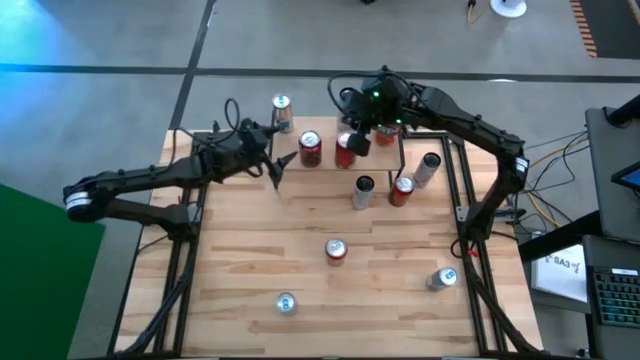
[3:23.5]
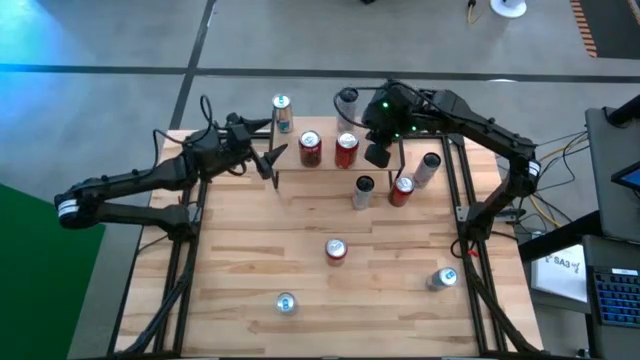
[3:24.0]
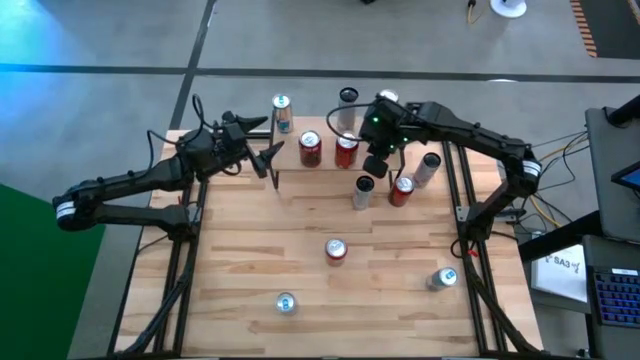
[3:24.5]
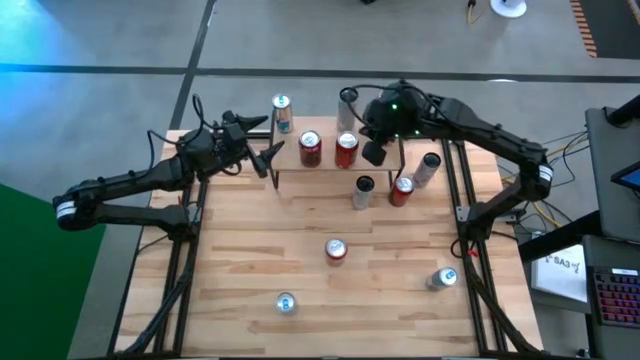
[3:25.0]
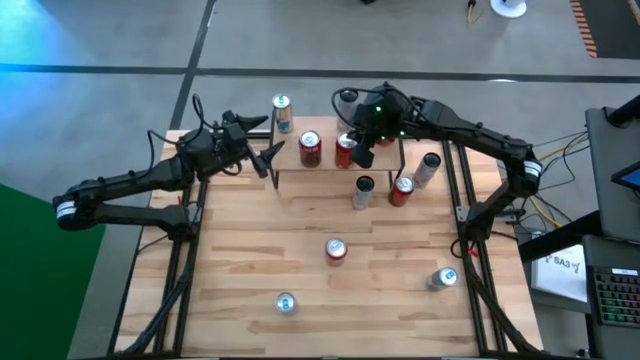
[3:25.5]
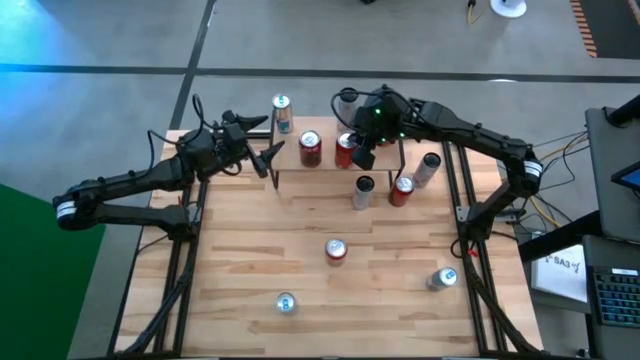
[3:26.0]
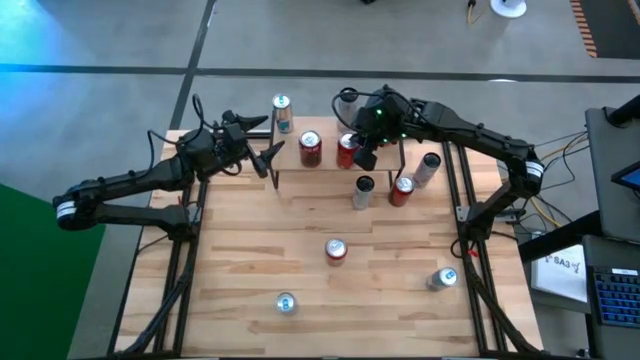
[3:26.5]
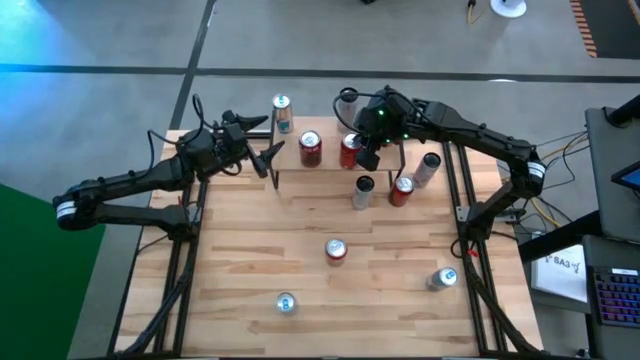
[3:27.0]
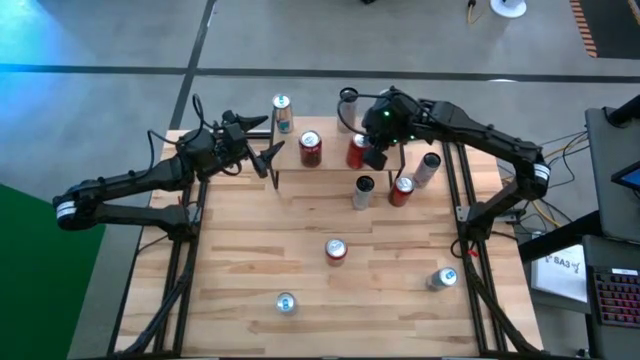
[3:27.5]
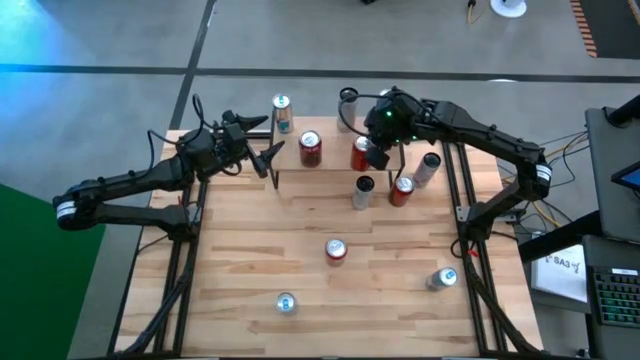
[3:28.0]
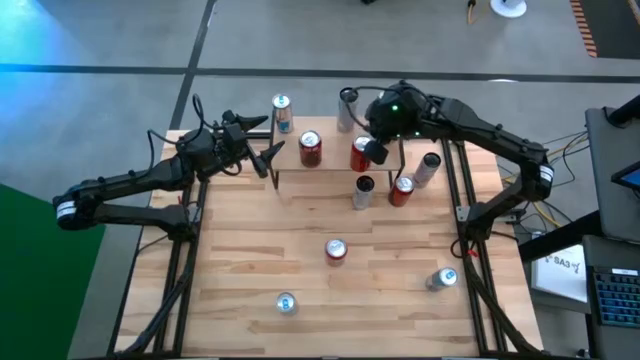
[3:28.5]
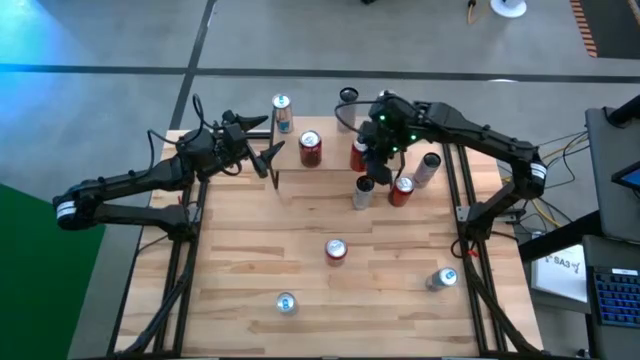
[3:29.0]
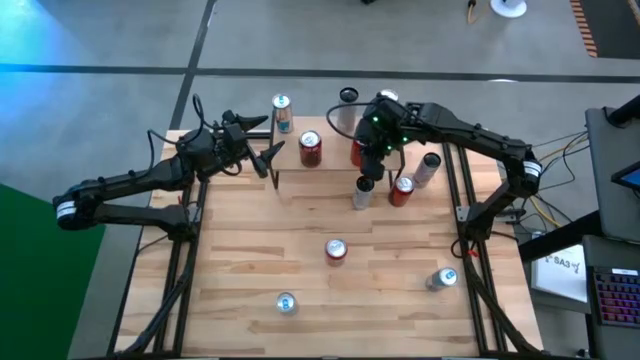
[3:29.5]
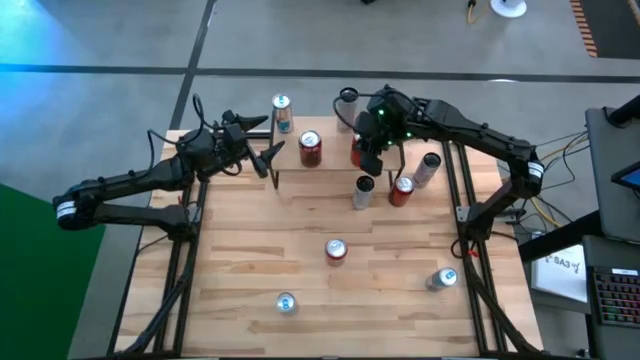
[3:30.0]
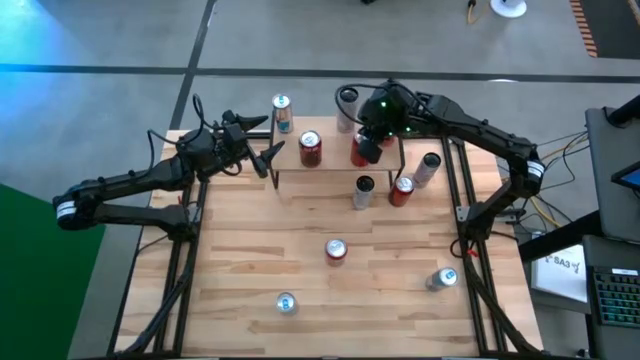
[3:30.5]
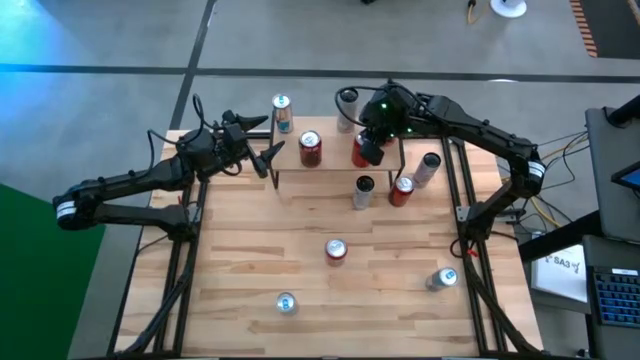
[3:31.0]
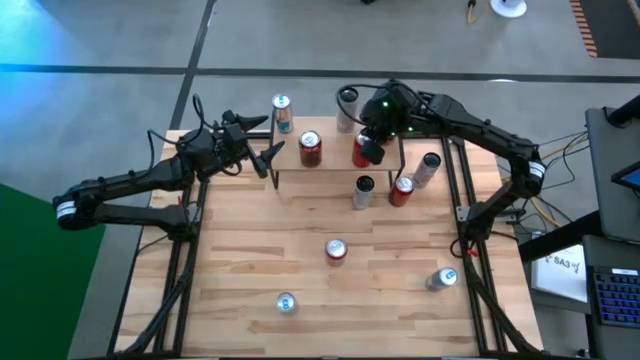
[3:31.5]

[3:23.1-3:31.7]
Task: Place canned beverage on shelf
Adjust the red black soda can from the shelf

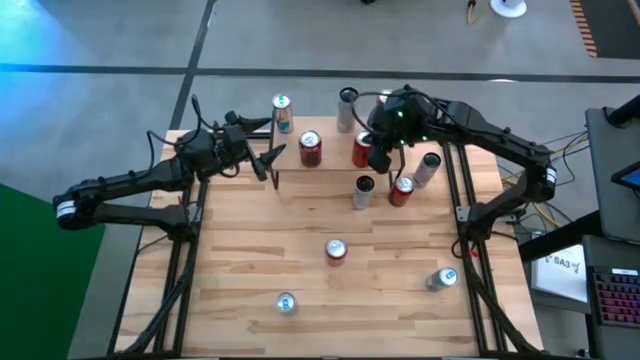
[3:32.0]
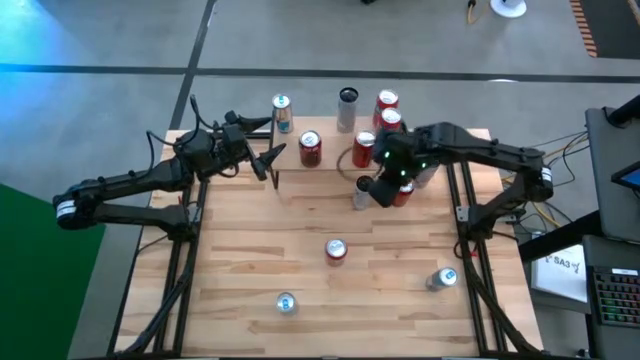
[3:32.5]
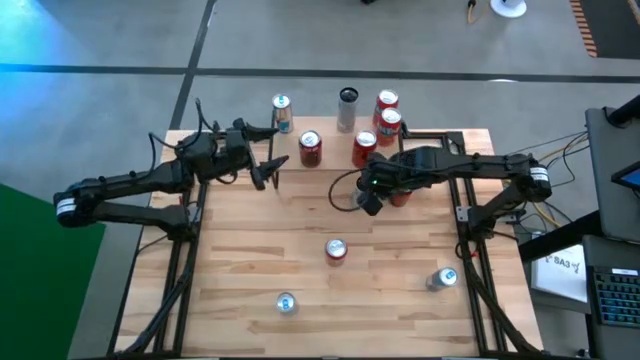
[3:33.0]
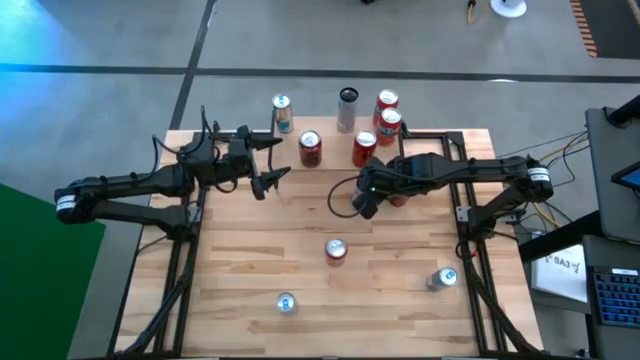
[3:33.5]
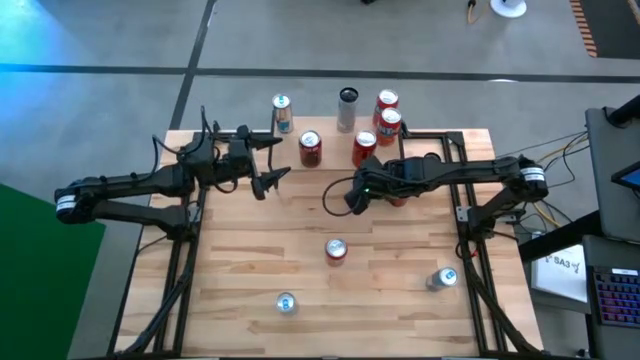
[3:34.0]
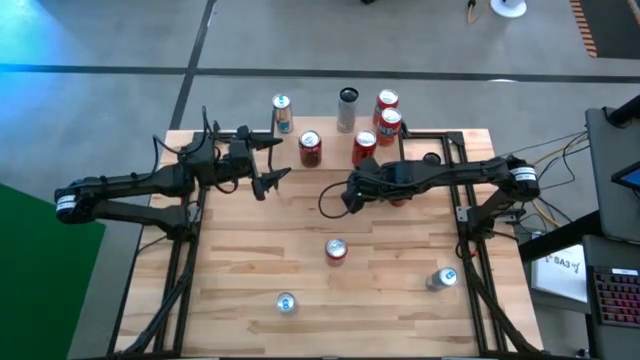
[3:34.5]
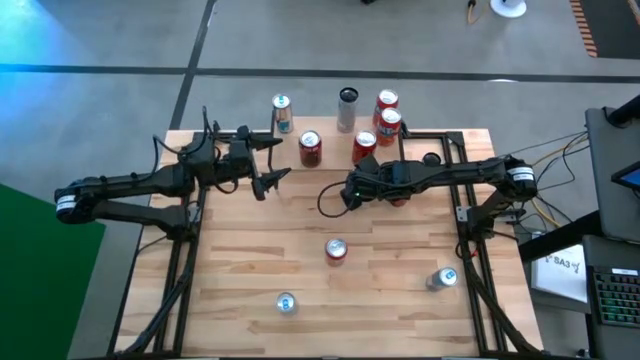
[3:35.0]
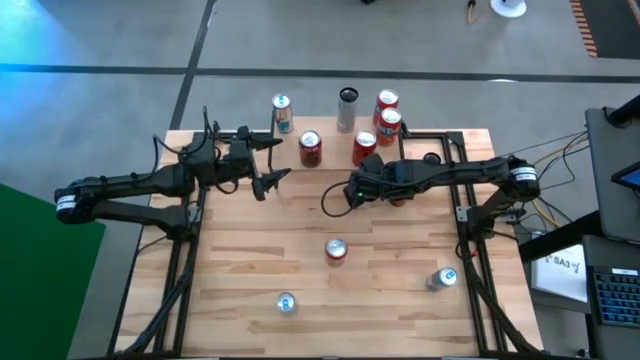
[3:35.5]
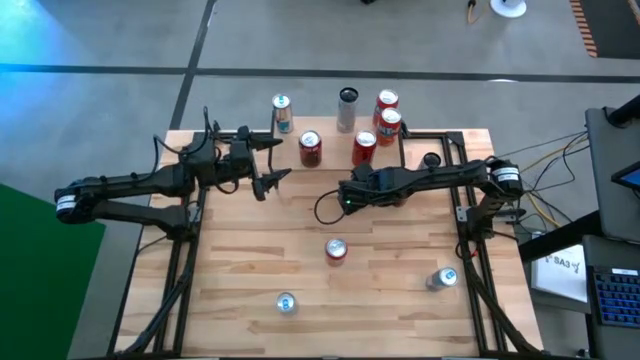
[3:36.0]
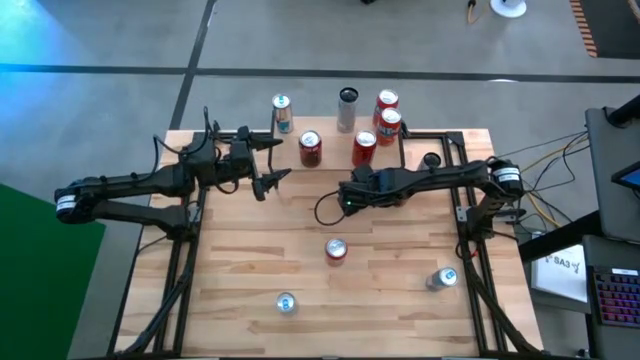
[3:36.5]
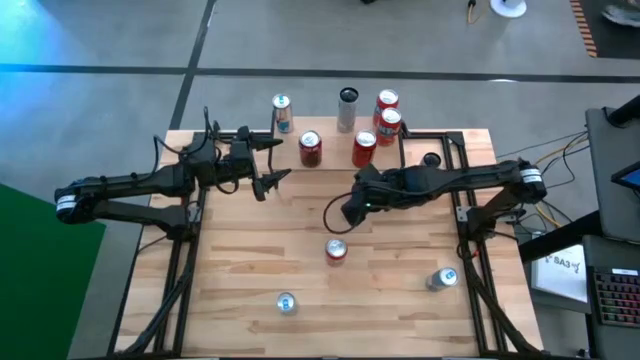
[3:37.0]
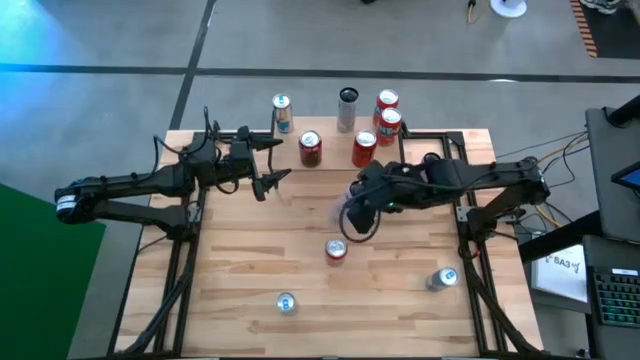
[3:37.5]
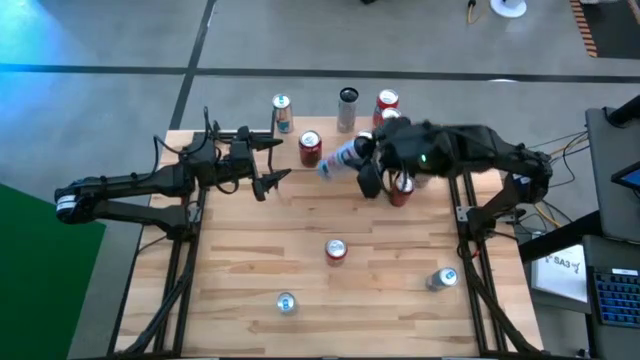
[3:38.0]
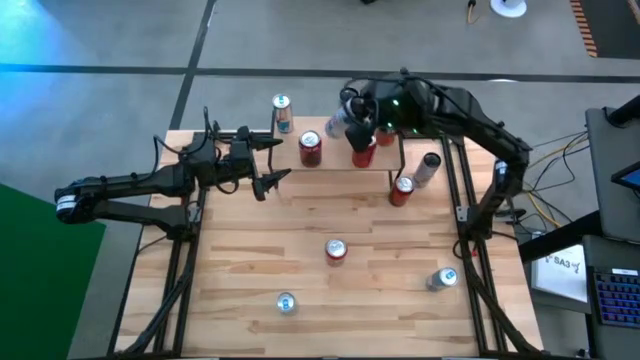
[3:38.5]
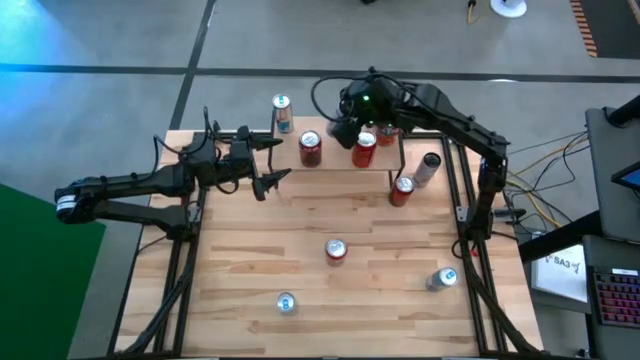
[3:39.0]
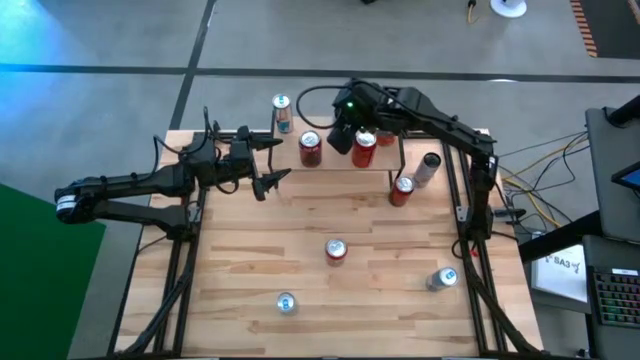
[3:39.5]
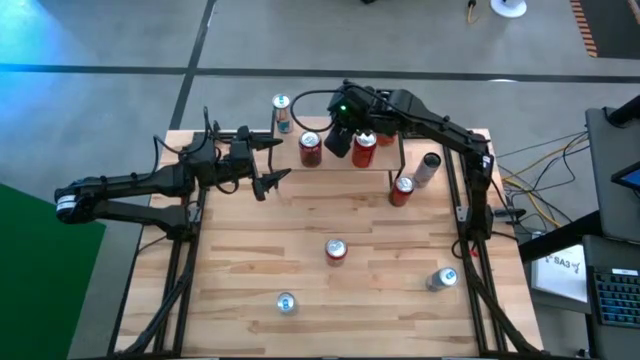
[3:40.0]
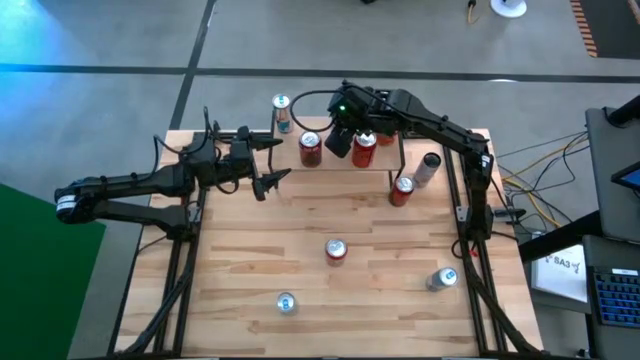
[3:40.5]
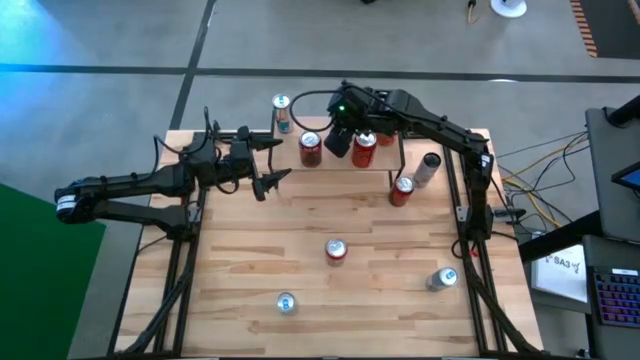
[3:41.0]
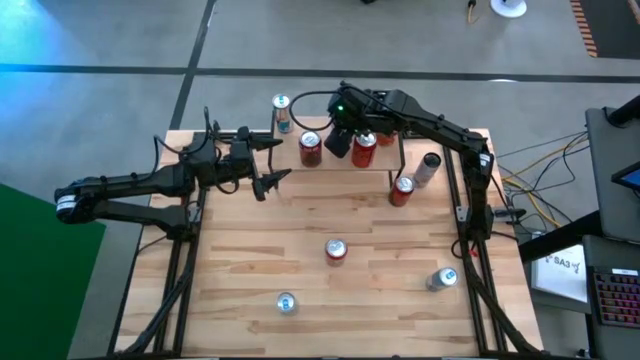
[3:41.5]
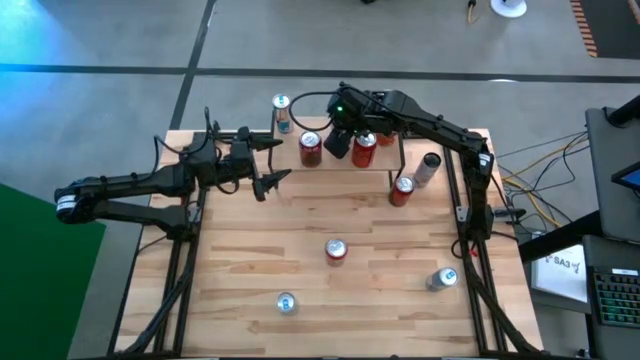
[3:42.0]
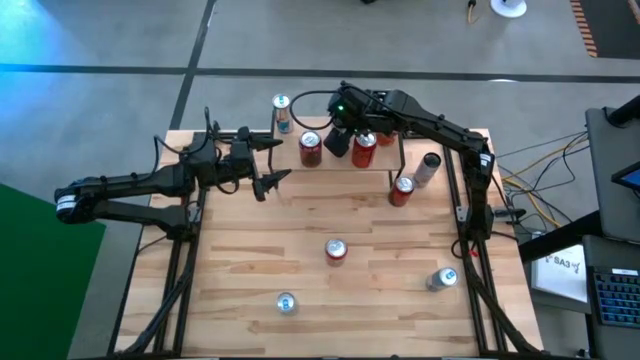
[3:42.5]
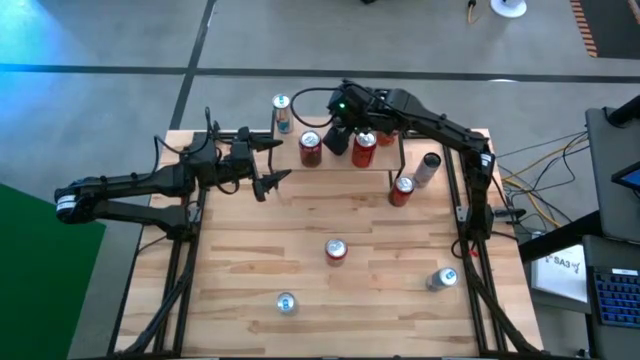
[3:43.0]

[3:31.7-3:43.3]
Put the white pink soda can on the shelf

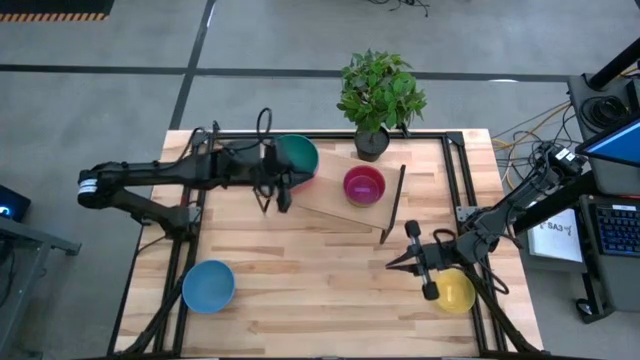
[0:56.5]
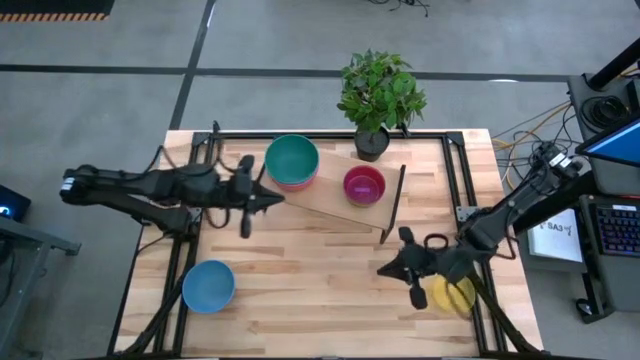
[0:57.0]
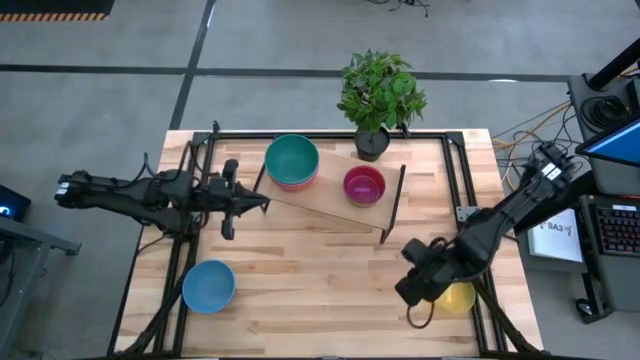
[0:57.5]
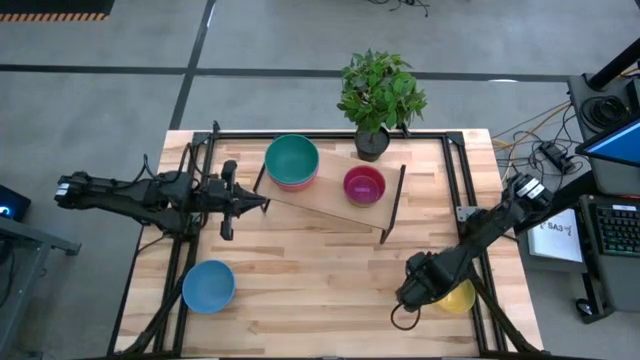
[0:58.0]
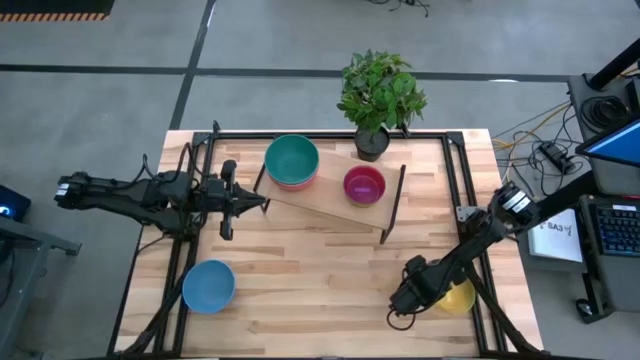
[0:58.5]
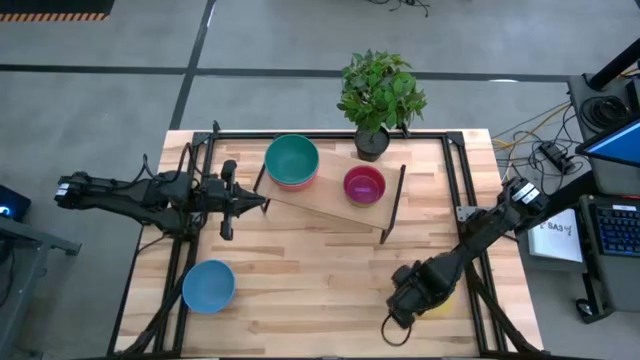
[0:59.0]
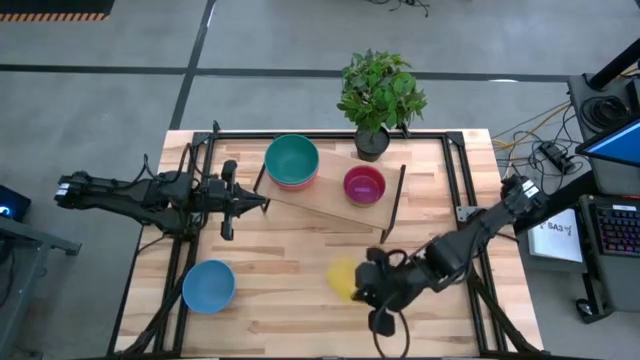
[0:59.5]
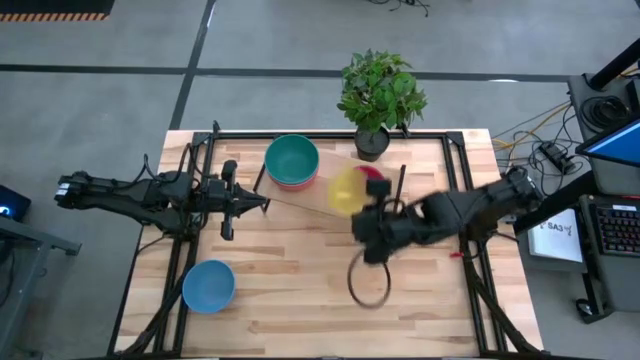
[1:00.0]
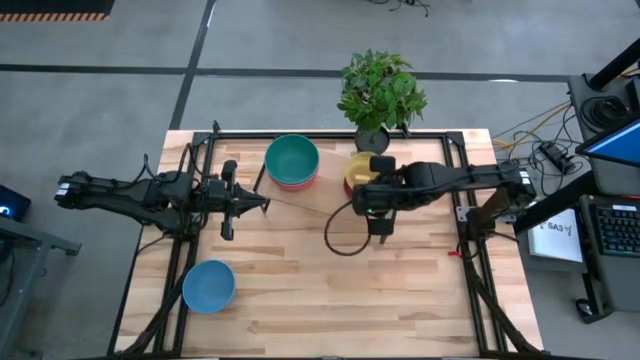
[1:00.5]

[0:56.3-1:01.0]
Task: Place and stack bowls onto a shelf
Stack the yellow bowl on top of the violet bowl on the shelf
